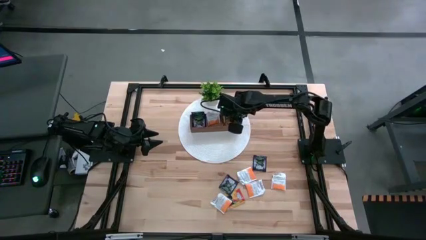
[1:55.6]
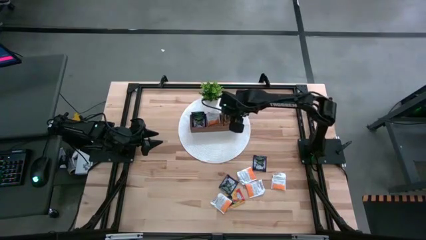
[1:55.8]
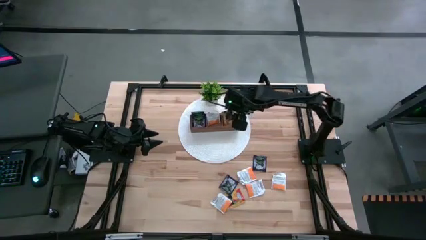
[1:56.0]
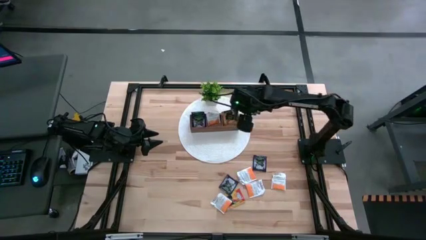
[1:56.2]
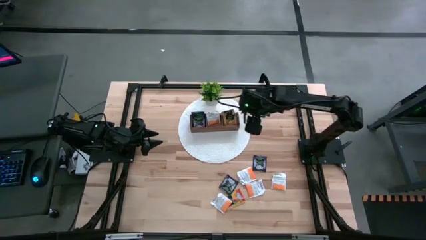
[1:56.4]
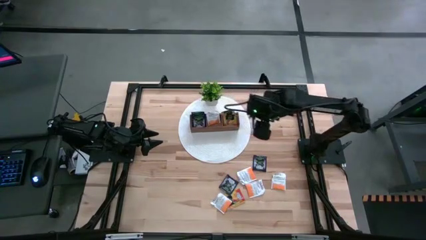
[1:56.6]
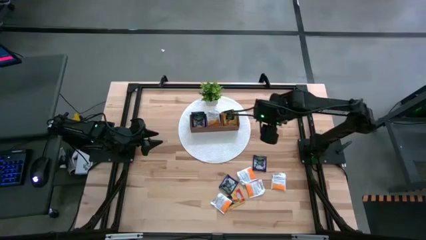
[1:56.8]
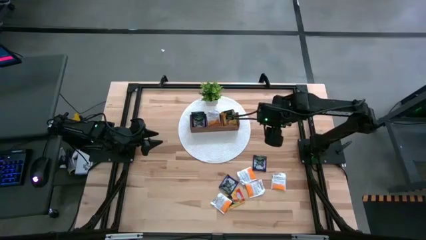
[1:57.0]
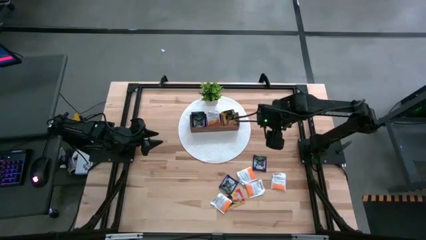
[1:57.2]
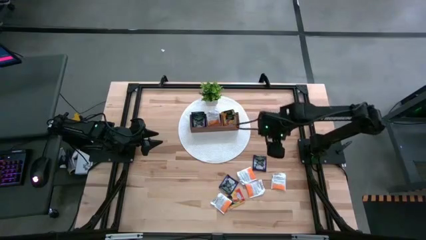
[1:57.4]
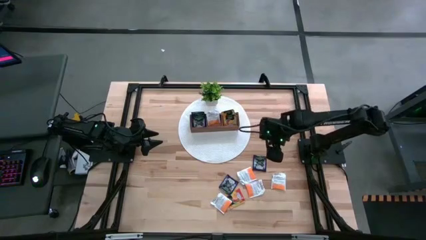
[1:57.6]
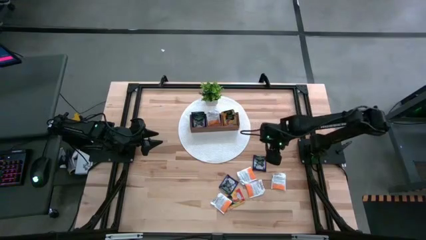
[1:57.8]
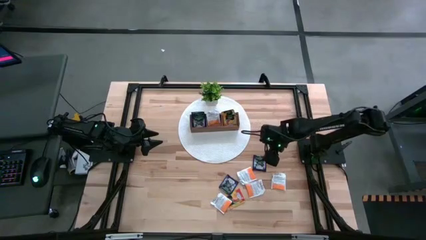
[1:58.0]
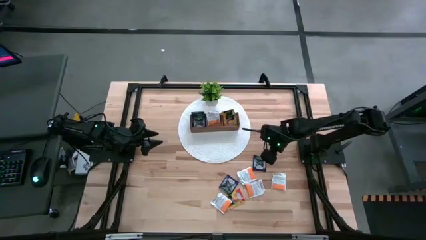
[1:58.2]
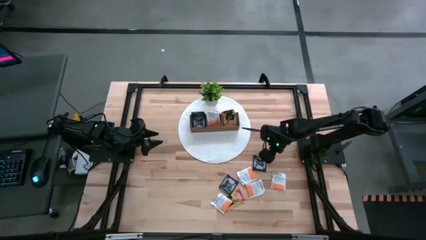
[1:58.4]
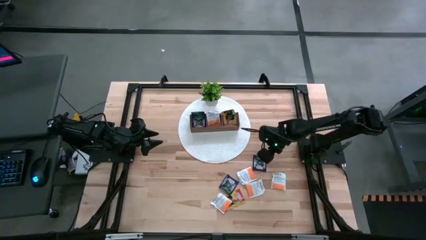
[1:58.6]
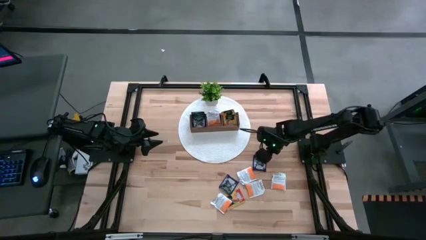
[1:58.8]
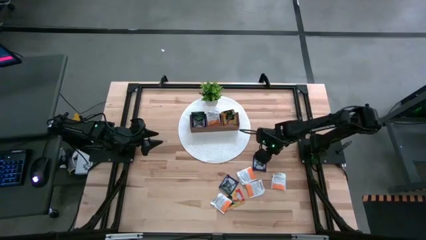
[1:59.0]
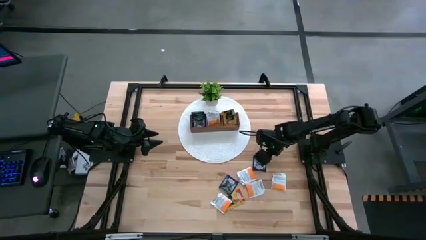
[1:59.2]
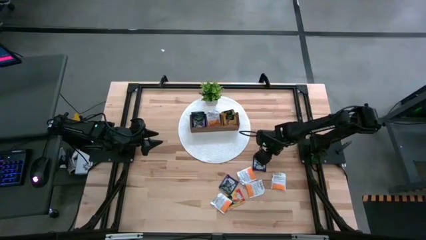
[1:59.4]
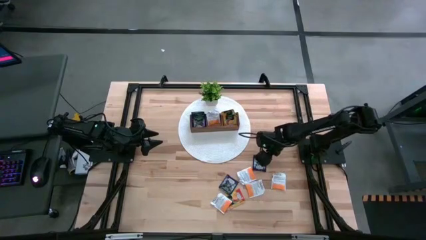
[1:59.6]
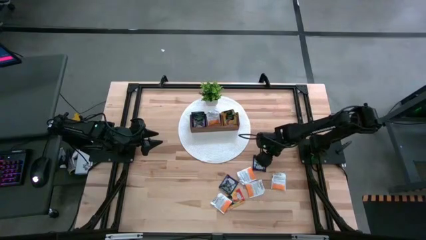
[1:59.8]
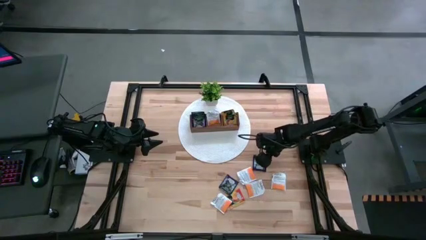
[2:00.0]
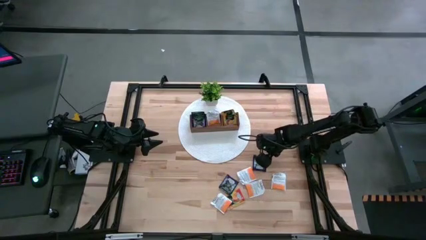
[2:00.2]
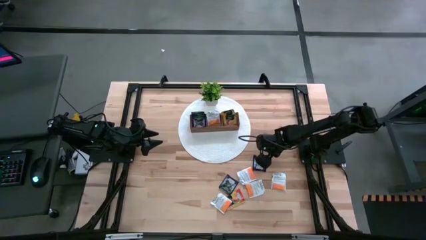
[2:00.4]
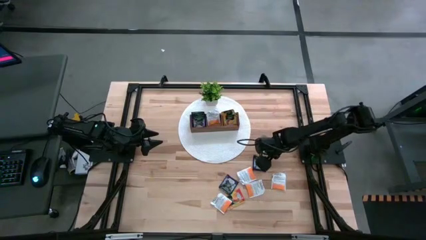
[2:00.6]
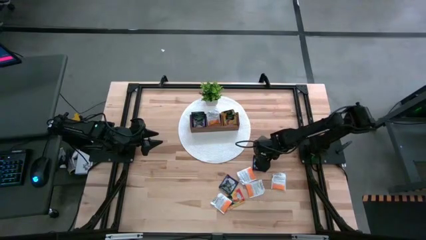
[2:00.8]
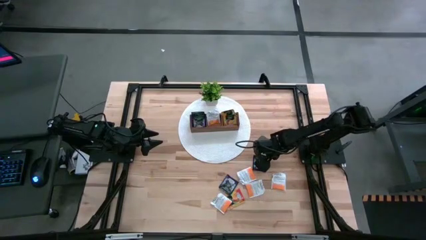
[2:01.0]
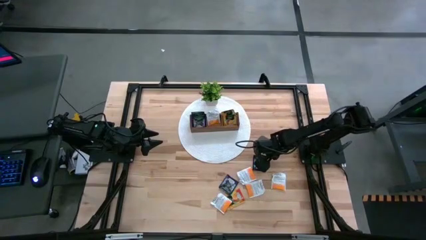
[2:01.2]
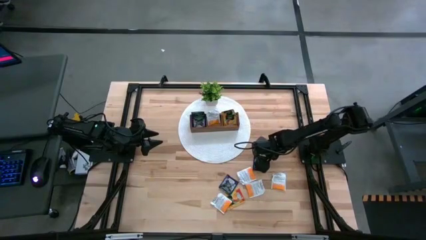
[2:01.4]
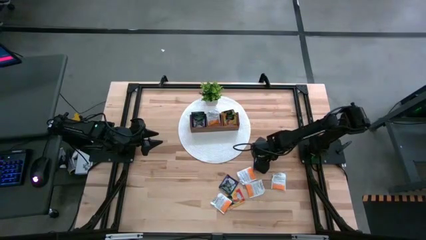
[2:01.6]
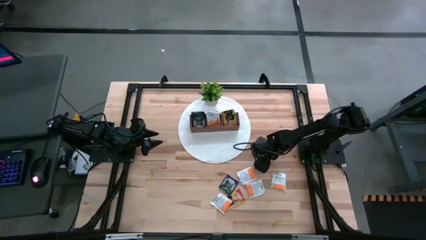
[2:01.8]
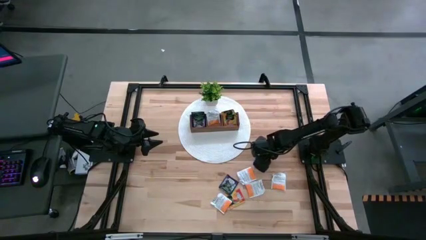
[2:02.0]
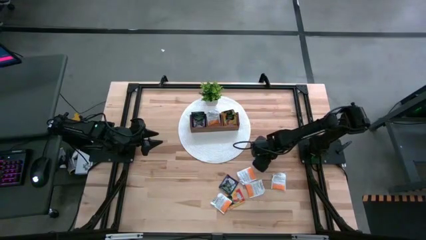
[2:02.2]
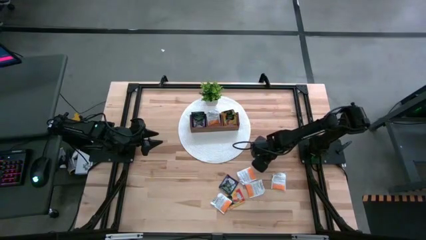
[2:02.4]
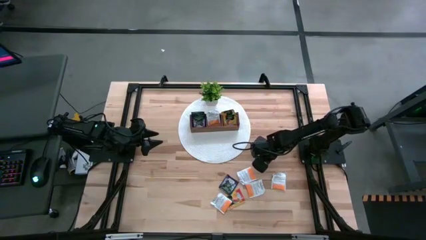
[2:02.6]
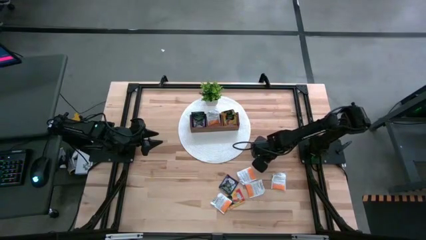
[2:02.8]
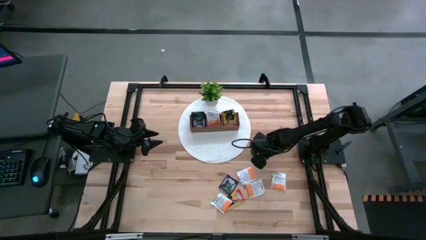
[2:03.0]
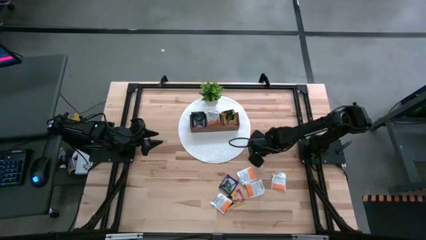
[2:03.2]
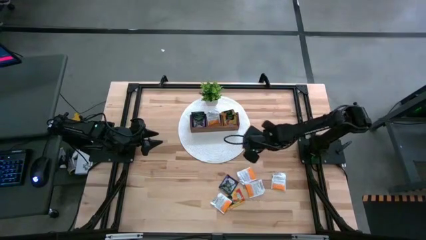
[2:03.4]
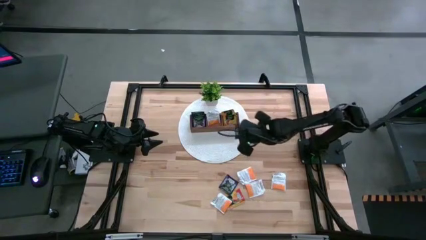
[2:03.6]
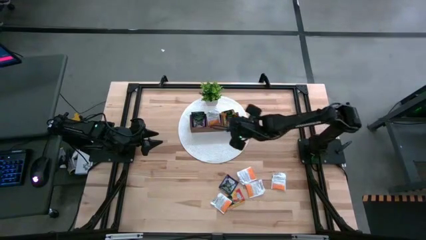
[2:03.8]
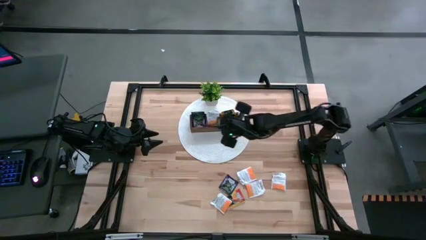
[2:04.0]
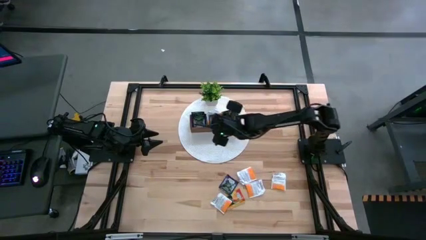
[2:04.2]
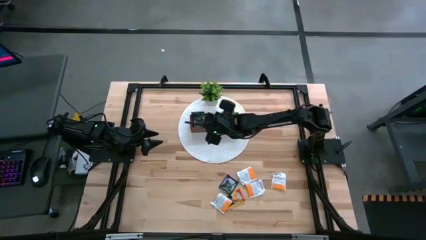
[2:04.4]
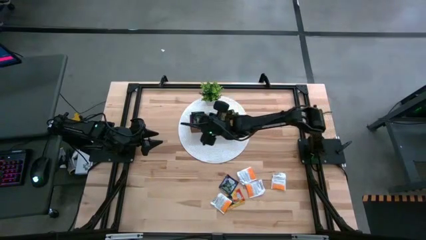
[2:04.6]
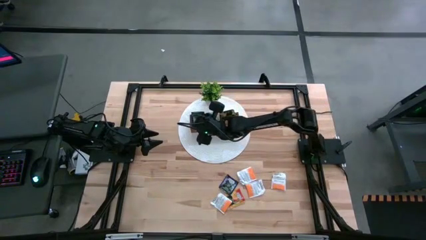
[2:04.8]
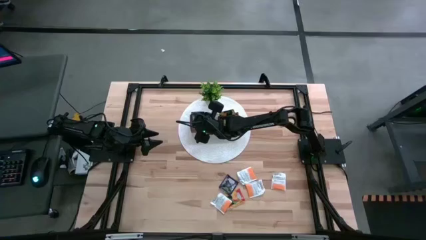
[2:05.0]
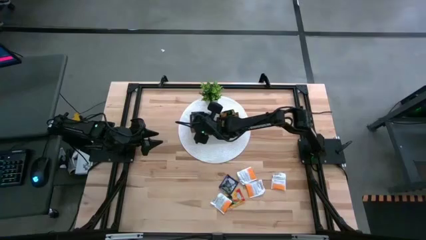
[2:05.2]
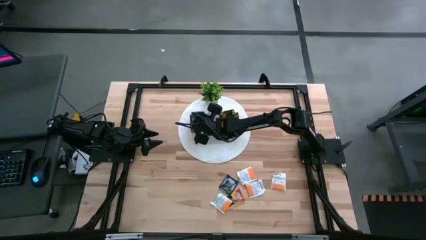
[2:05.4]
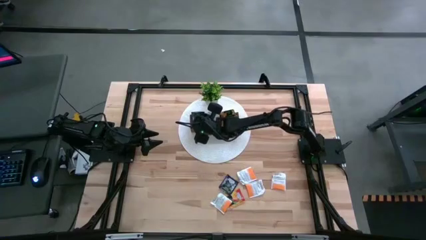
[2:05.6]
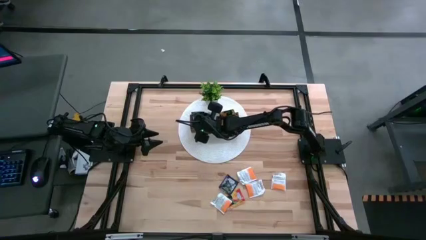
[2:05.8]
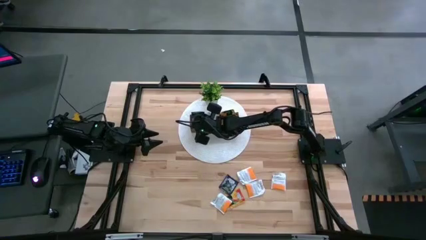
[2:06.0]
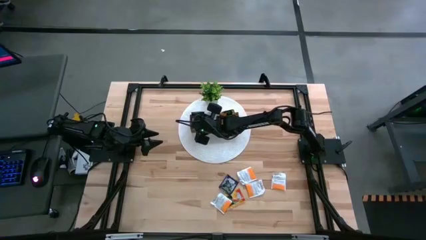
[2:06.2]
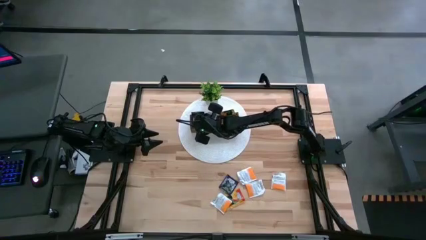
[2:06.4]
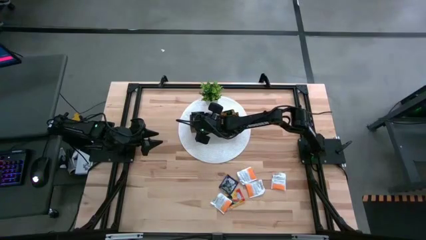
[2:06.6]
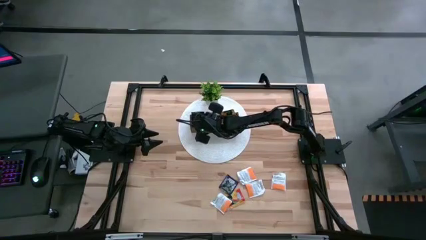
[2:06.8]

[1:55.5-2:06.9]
Task: Pick & Place Tea
Put the black tea bag into the left section of the wooden organizer

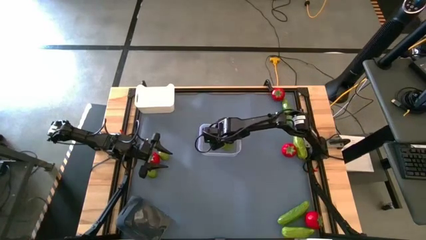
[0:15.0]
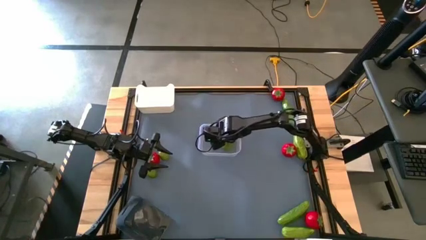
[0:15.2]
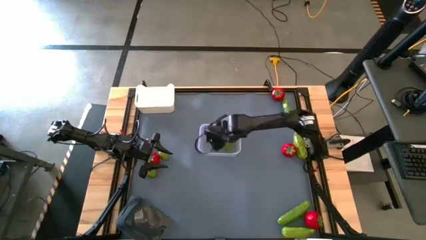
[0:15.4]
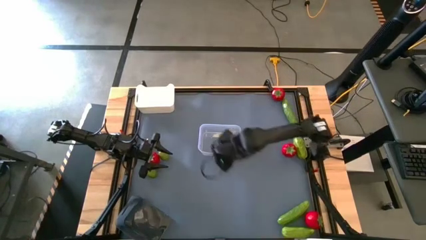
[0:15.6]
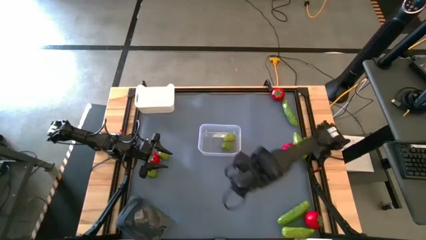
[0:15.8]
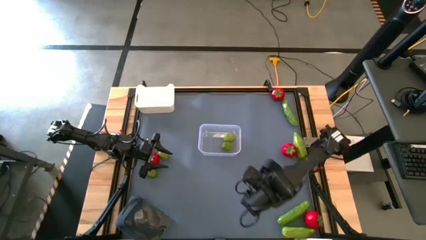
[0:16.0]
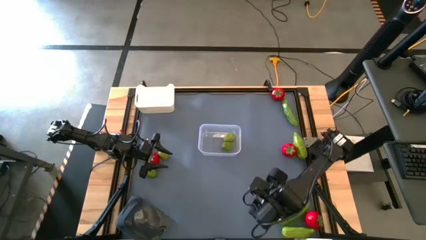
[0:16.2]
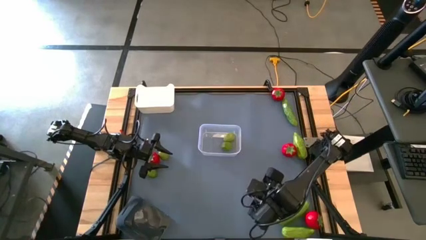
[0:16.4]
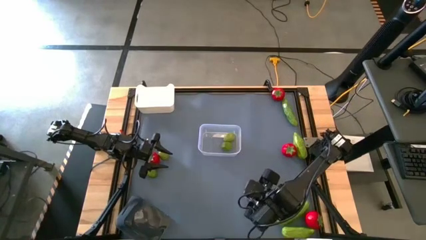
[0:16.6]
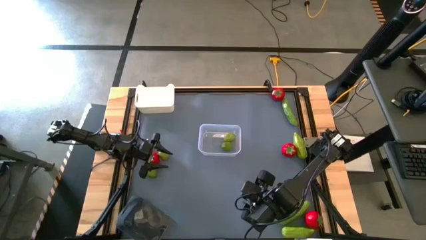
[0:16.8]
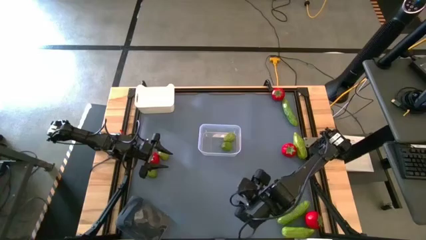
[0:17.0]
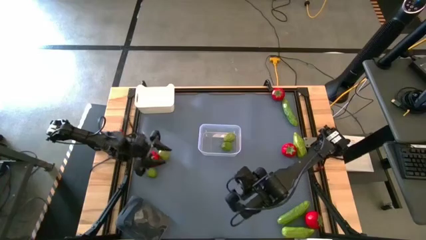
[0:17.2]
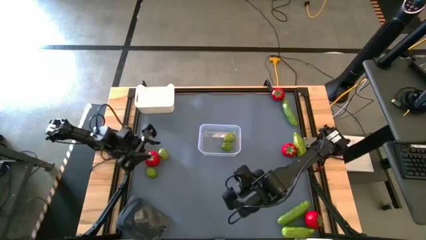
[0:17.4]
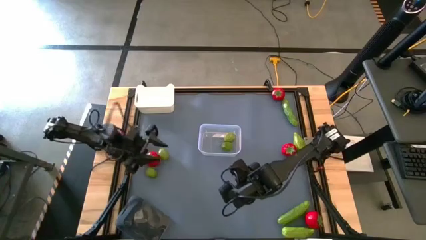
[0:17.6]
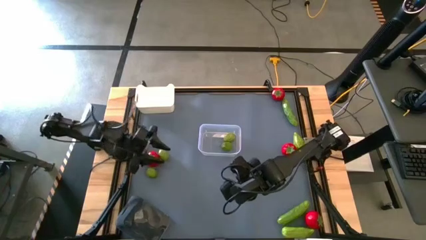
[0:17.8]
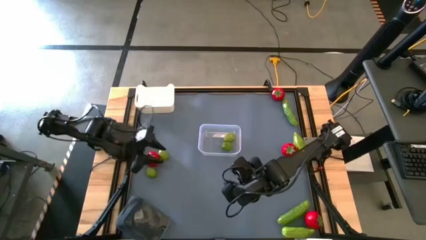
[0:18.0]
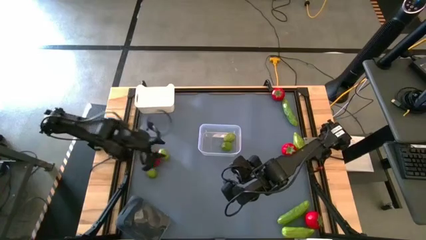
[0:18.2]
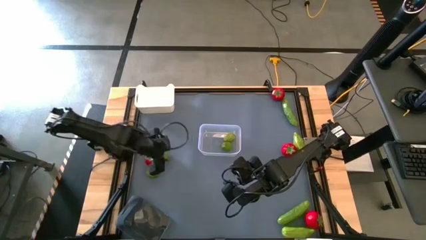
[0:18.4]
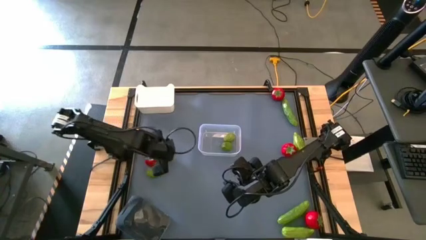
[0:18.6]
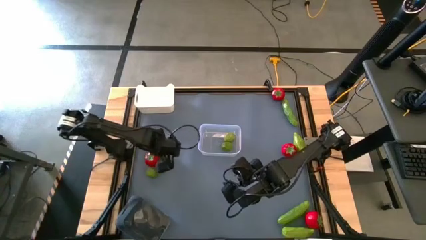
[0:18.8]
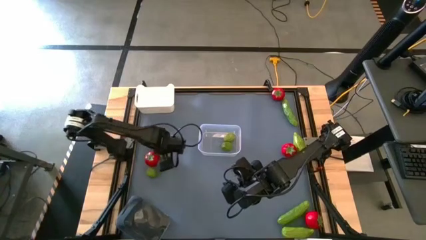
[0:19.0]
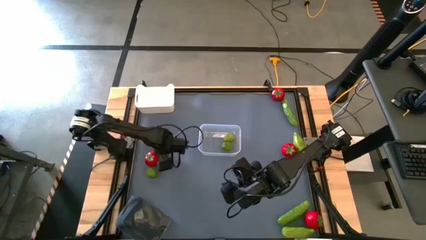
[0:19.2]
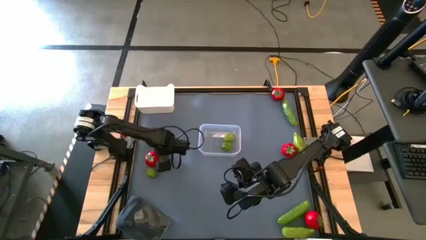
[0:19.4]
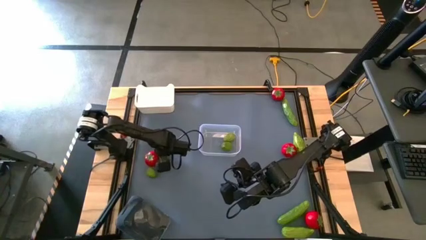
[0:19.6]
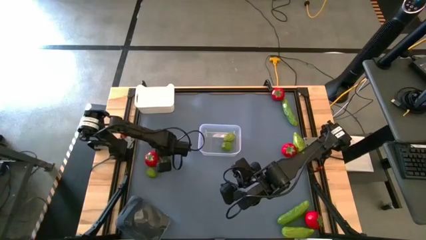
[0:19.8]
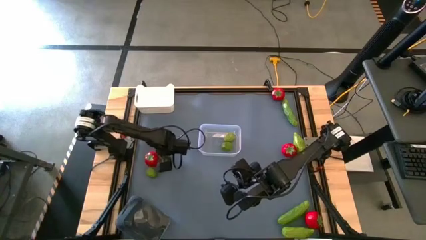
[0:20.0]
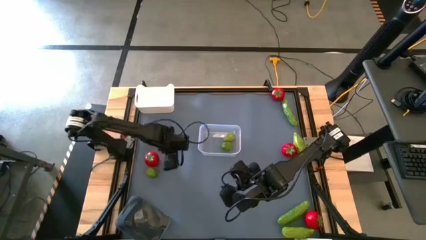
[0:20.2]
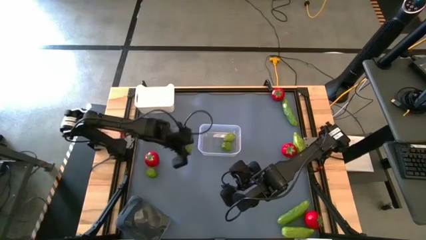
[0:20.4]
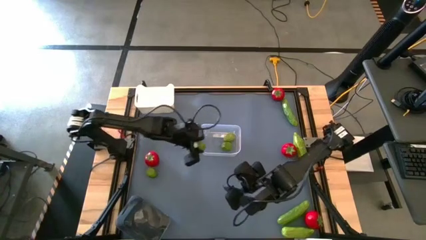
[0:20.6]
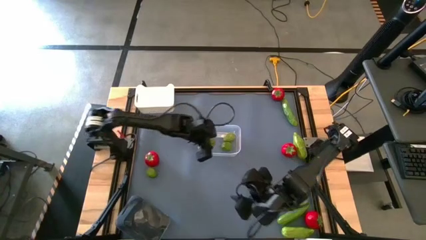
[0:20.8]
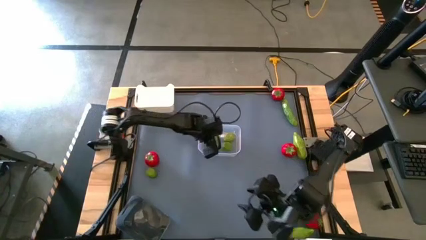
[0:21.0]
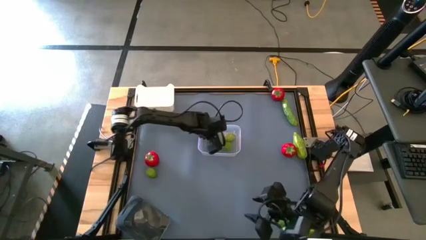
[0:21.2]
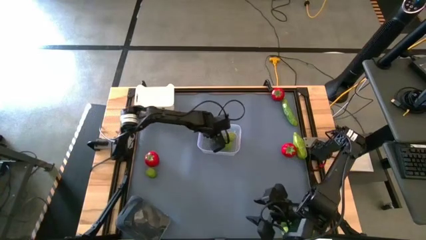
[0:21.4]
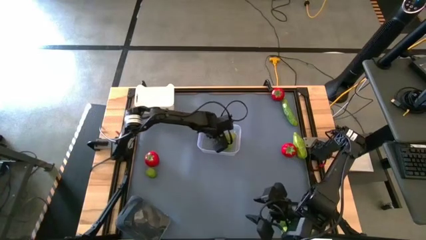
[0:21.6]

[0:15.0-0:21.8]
Task: Sort produce into baskets
Put the top lemon into the transparent bin
